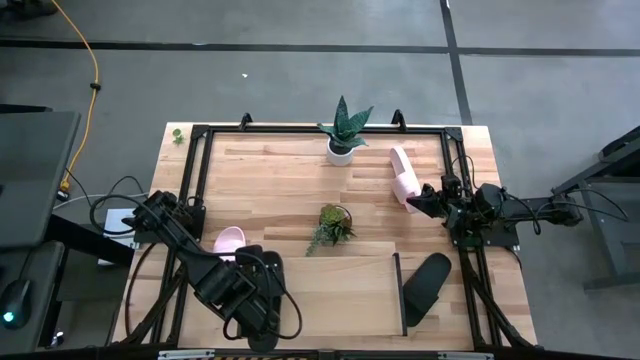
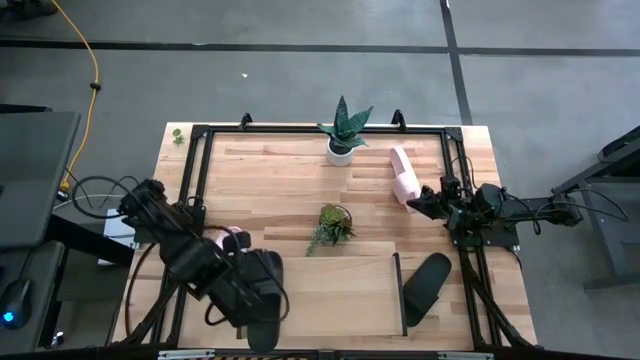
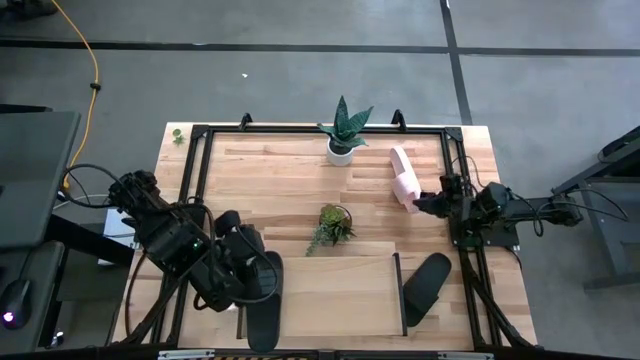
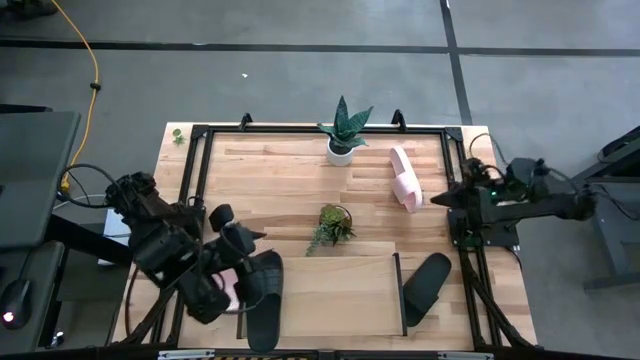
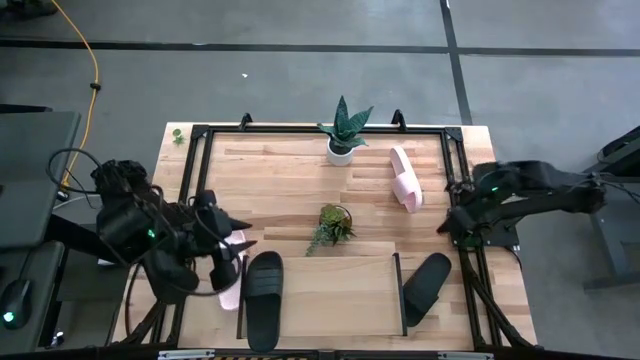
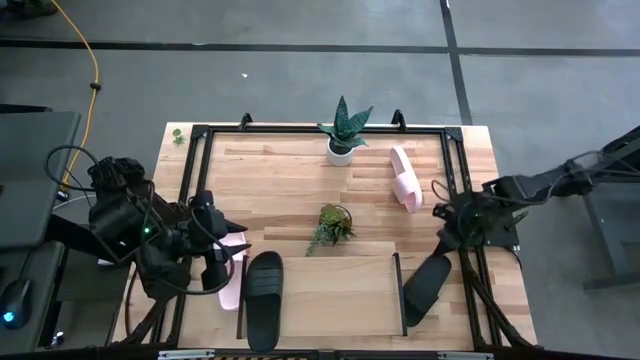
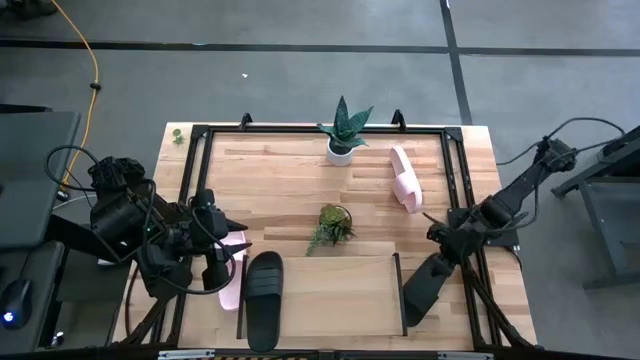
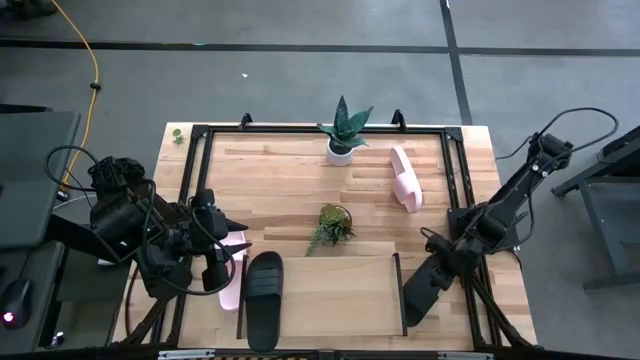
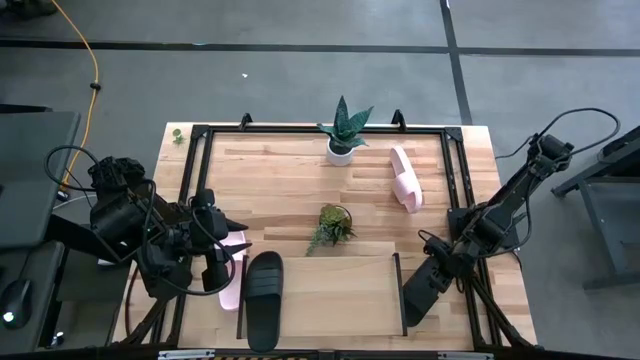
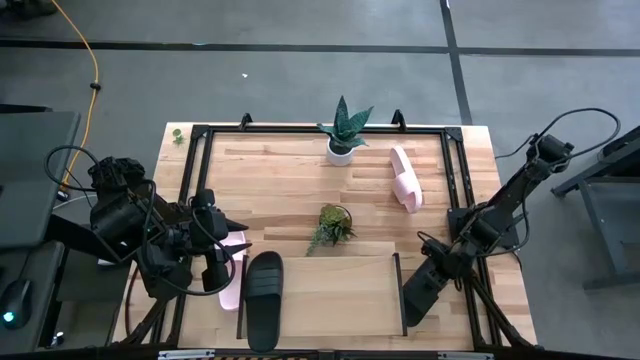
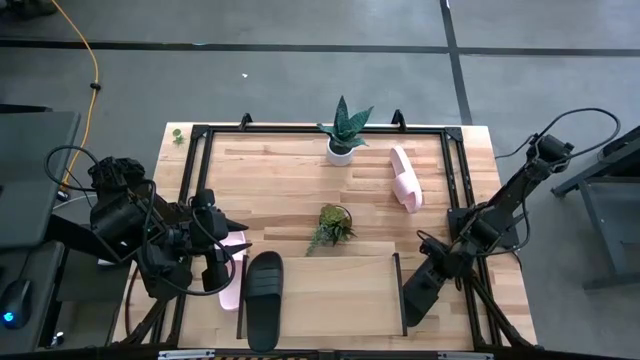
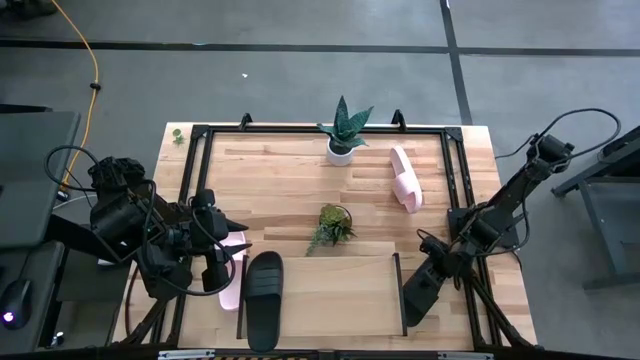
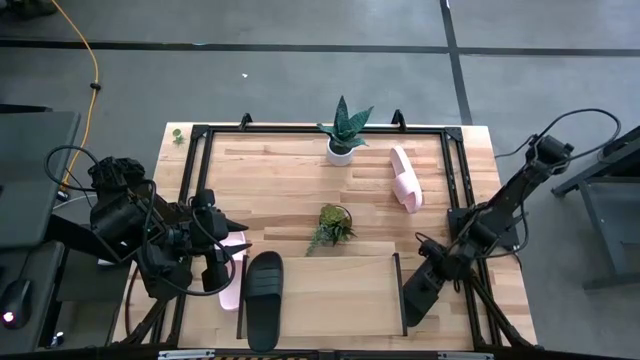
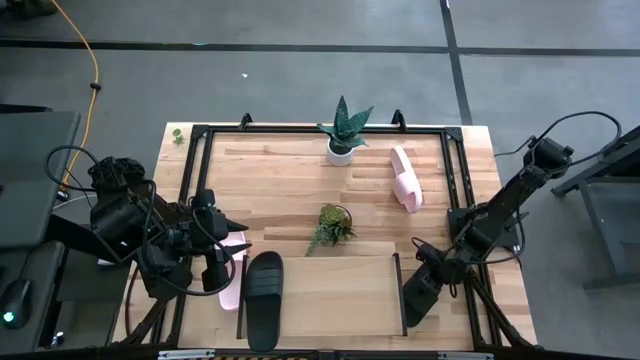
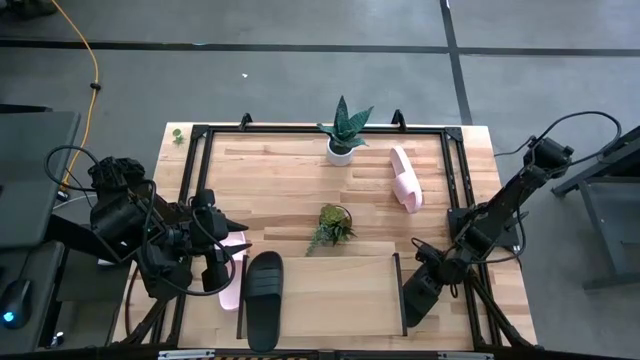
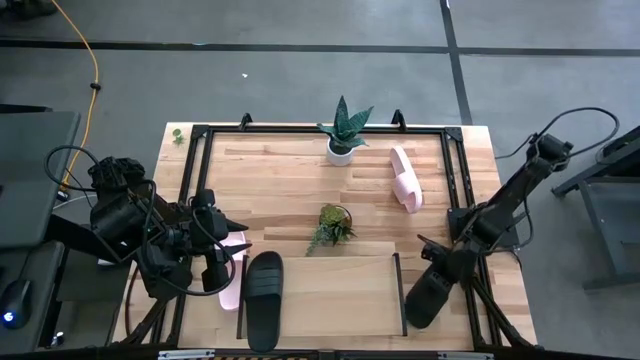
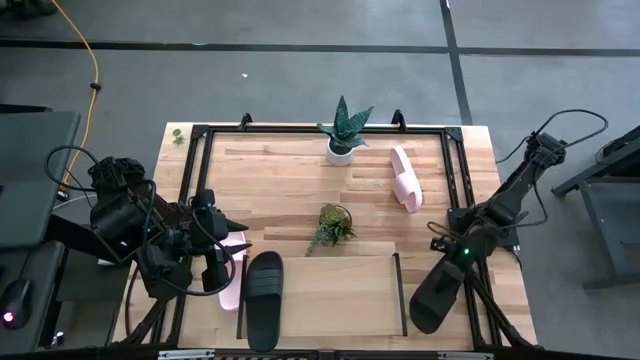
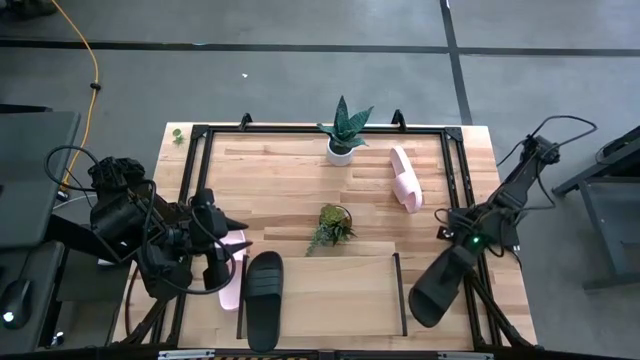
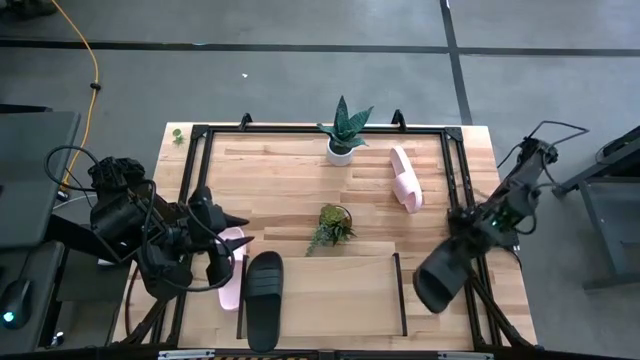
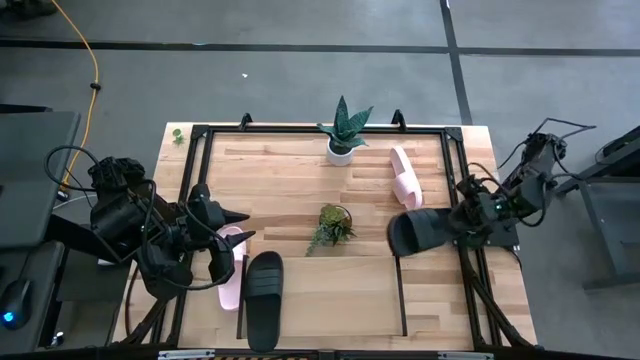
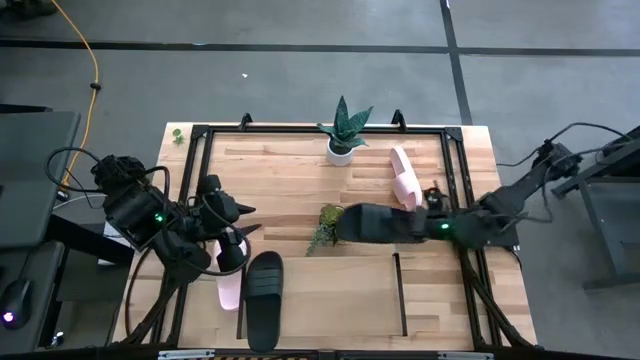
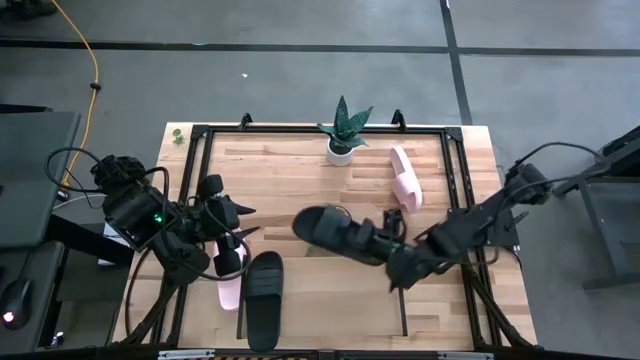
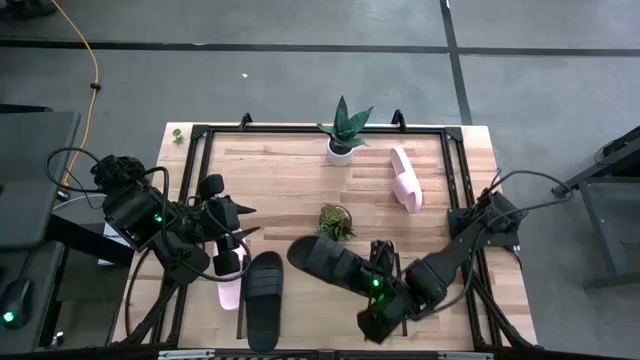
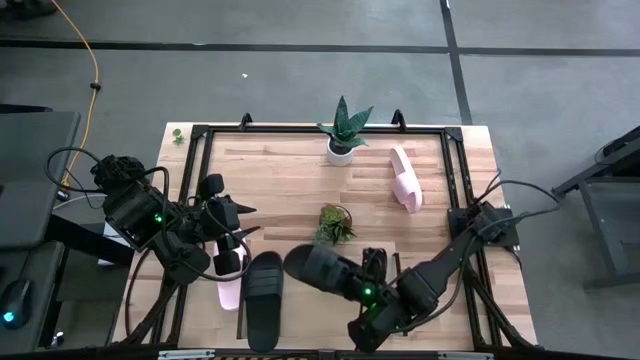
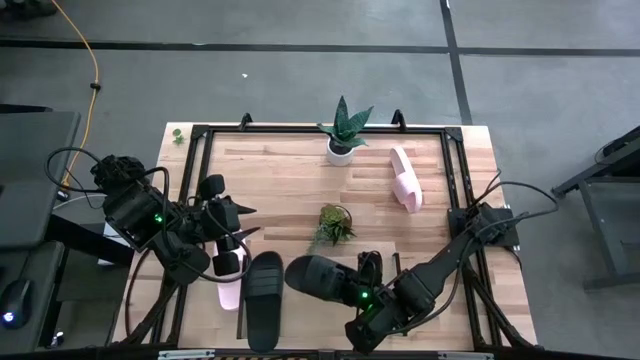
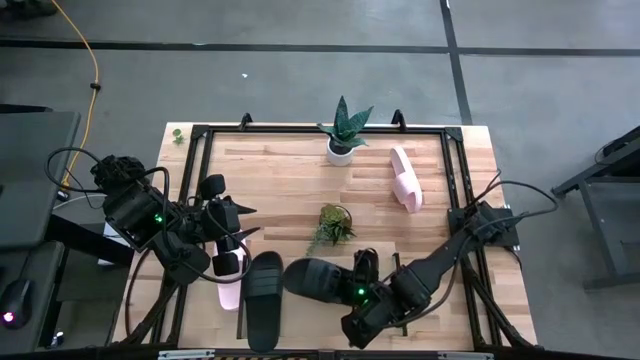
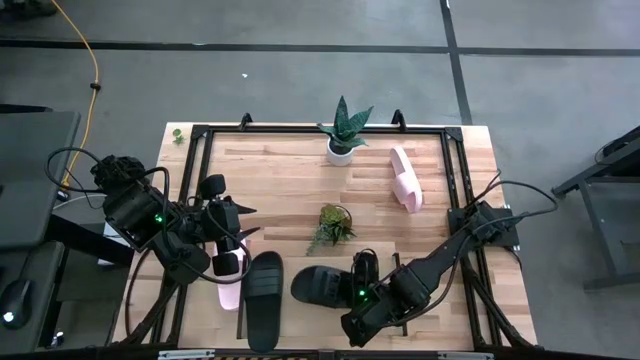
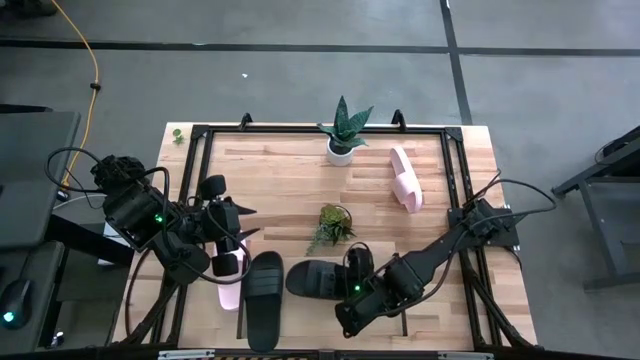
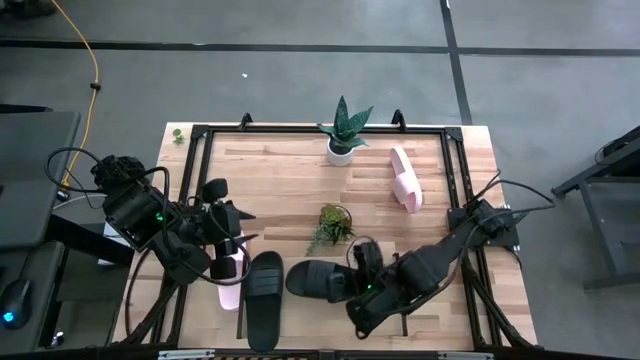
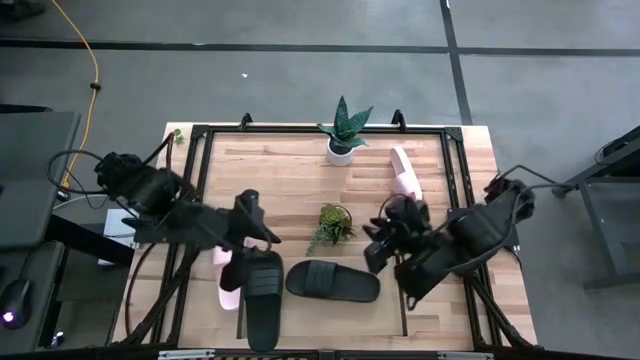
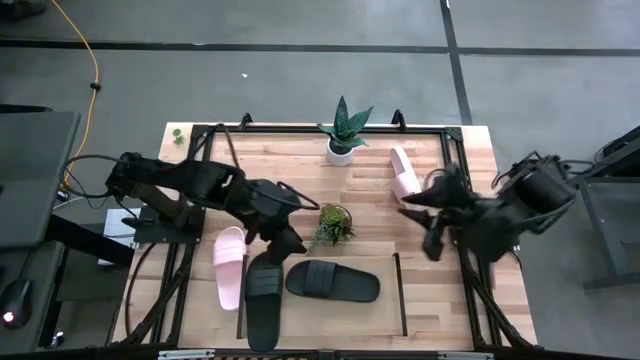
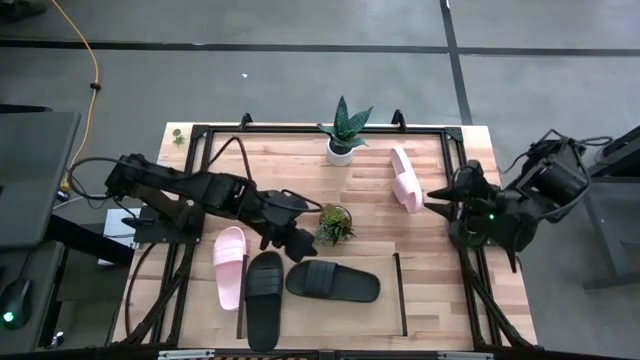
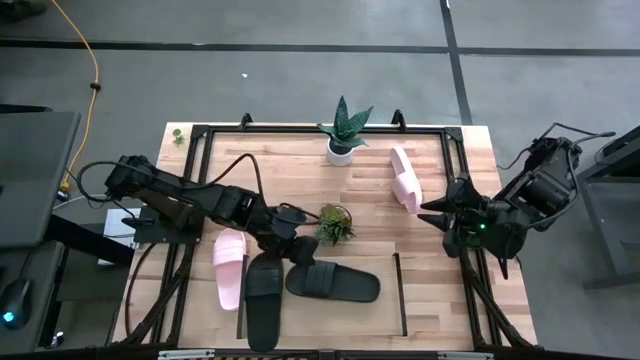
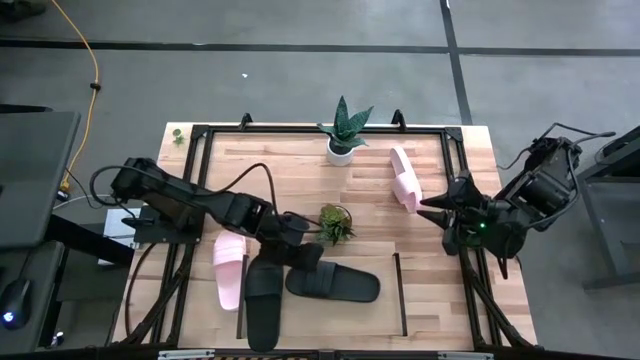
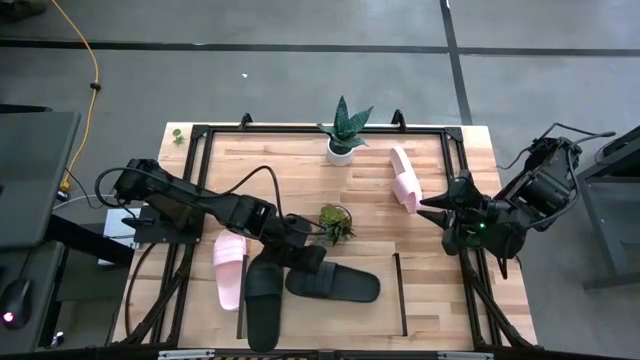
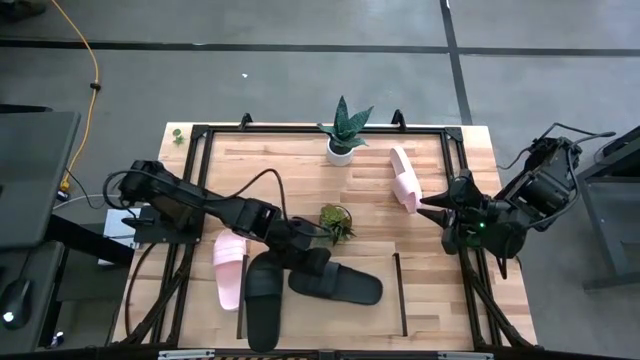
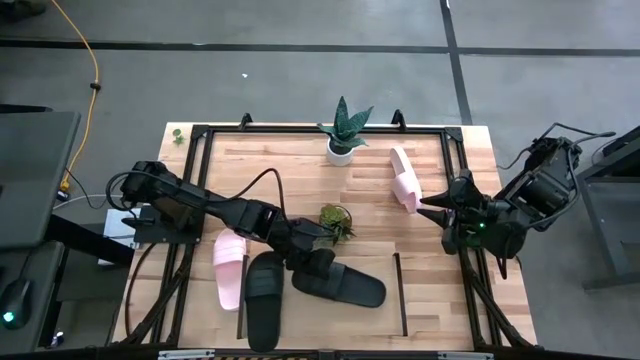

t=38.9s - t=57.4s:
Task: Pick and place slides into the shelf
Put the black slide on the shelf
